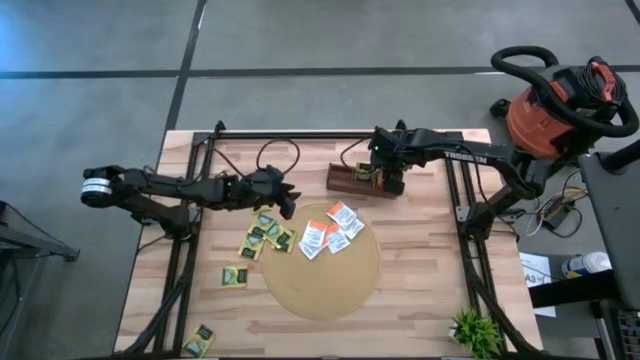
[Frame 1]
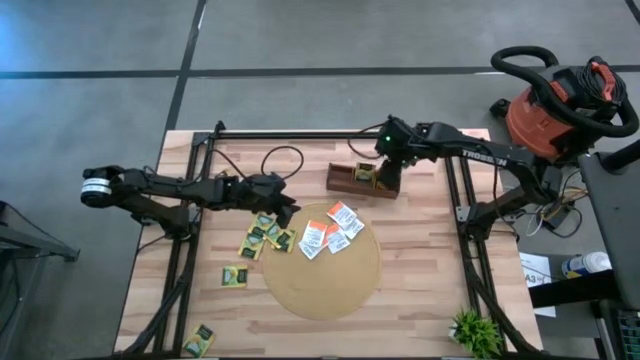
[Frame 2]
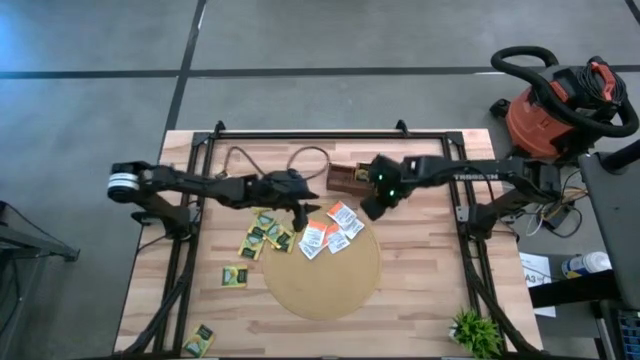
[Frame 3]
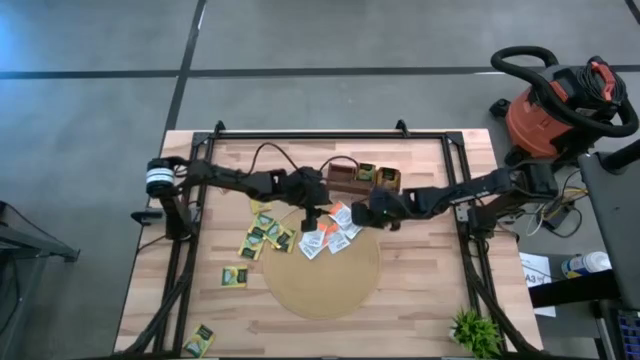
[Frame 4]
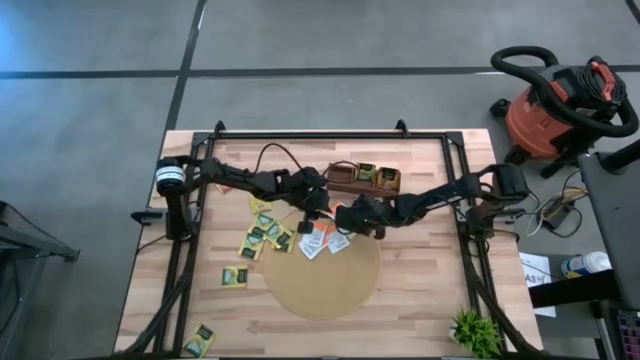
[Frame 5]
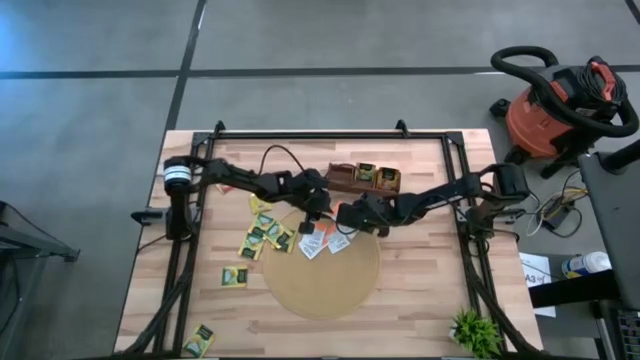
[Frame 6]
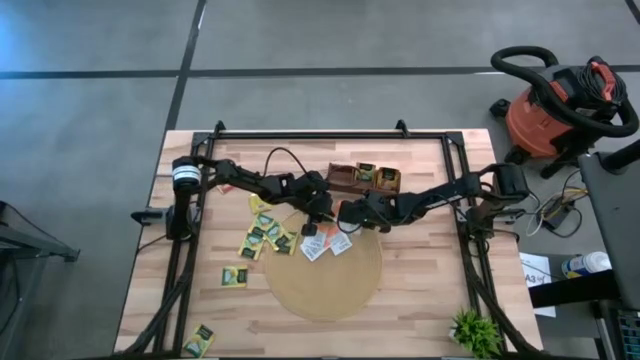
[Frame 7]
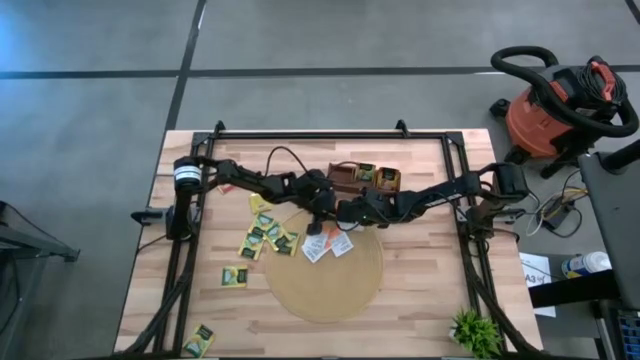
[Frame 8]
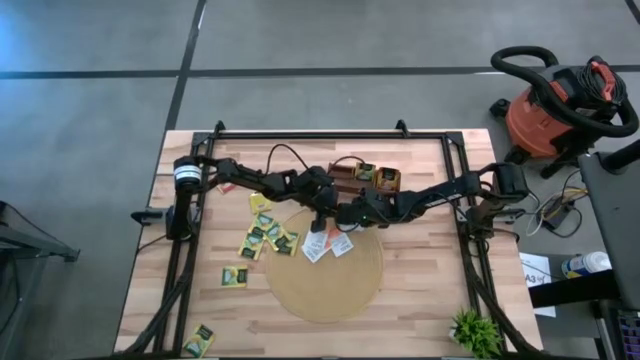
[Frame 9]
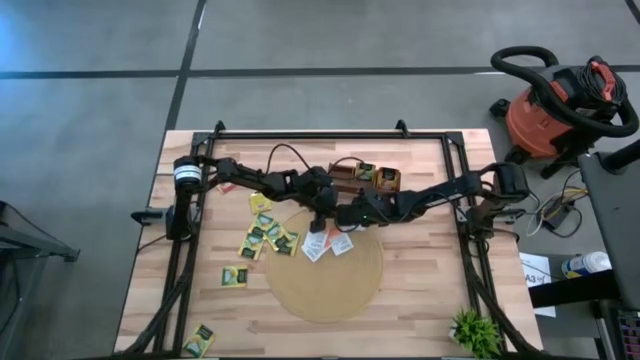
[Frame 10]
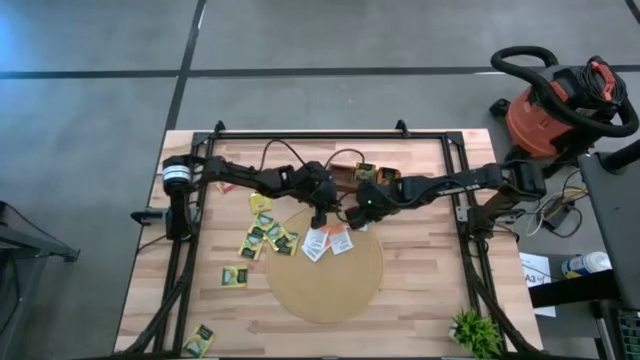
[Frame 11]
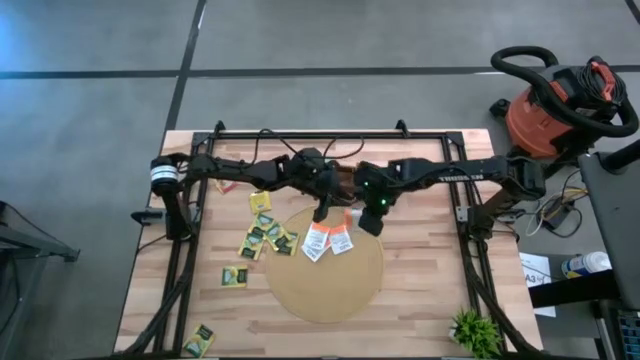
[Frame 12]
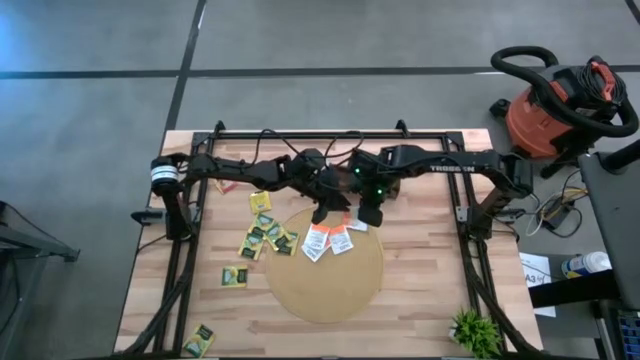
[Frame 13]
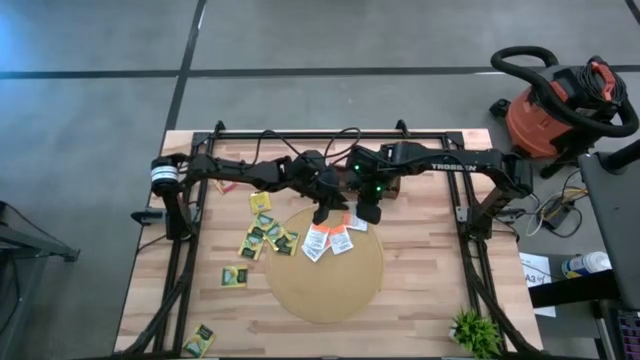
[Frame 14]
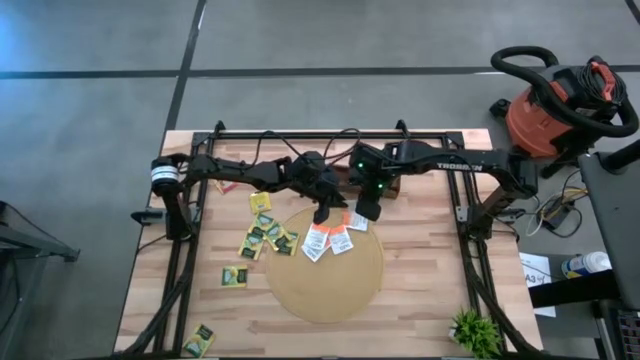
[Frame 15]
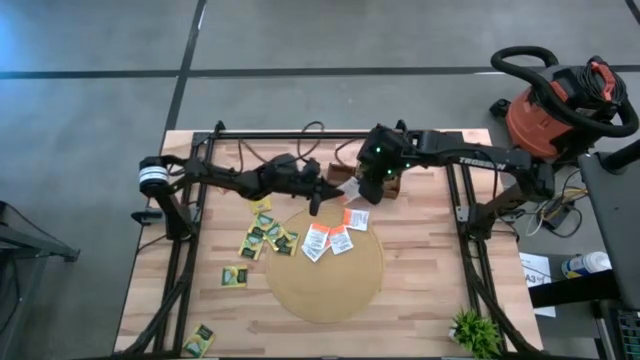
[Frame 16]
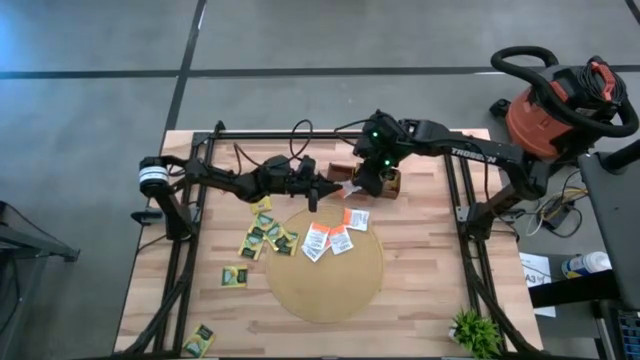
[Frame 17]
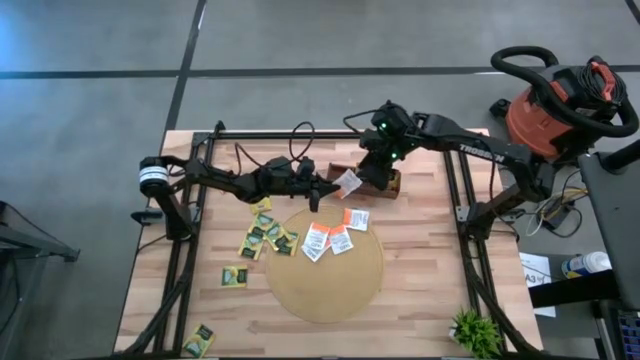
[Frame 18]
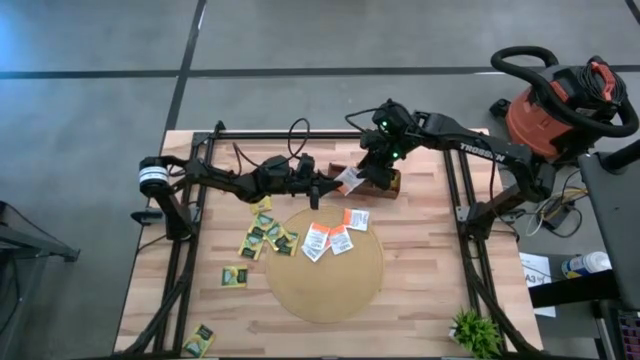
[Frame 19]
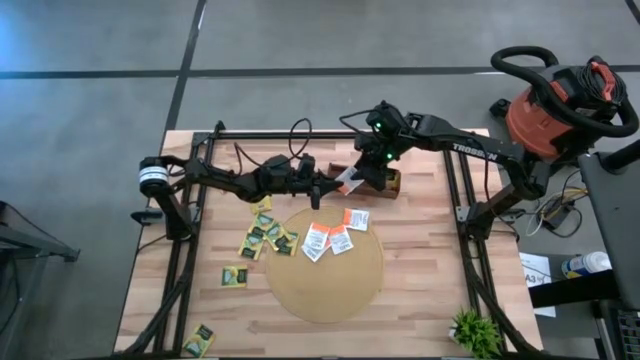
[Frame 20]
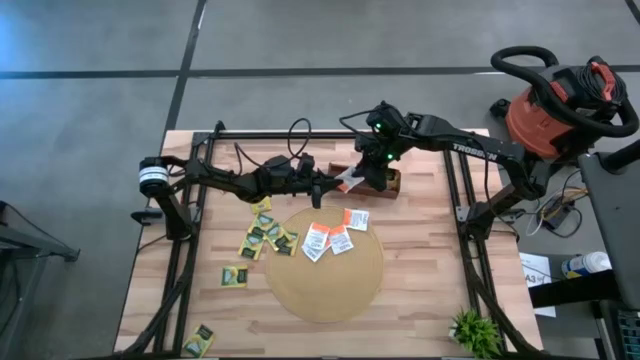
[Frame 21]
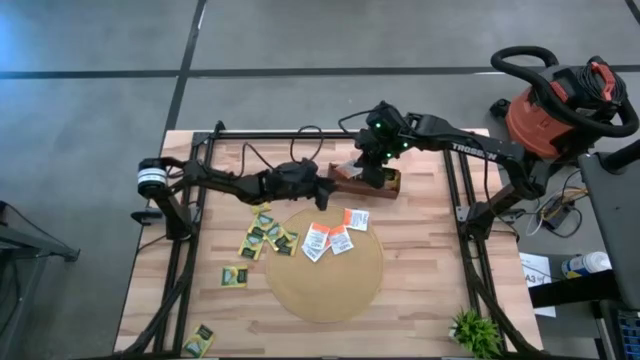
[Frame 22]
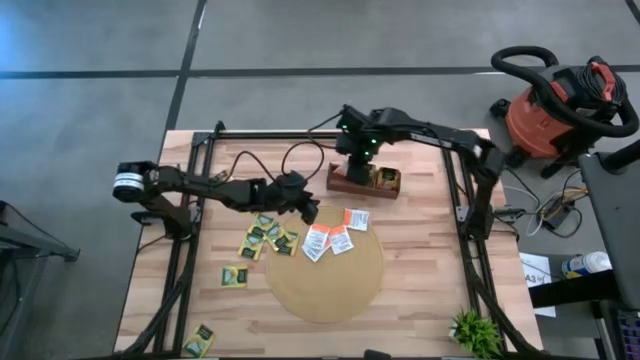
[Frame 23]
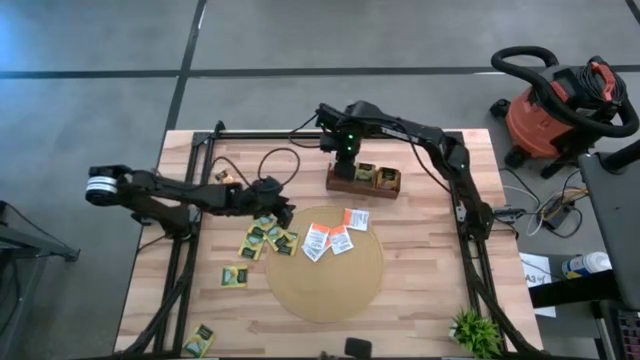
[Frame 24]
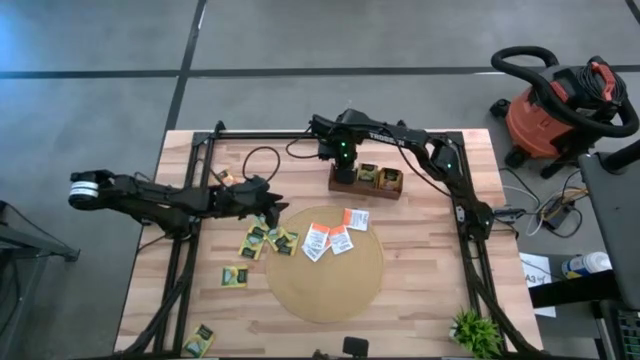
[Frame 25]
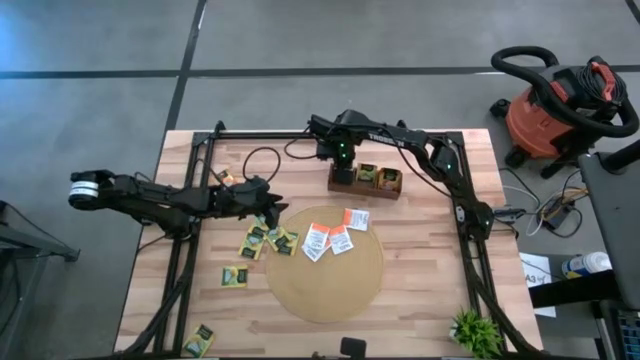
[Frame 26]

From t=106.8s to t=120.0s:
Task: Pick & Place Tea
Put the orange tea bag into the left section of the wooden organizer
